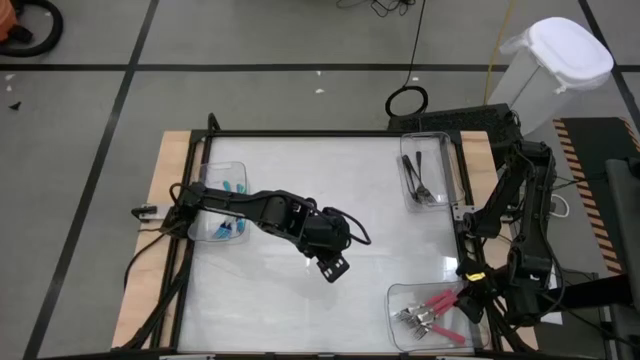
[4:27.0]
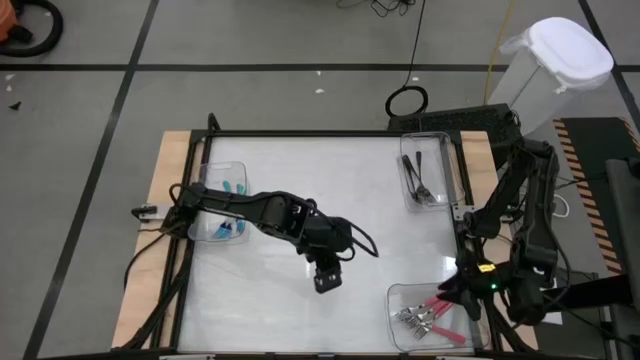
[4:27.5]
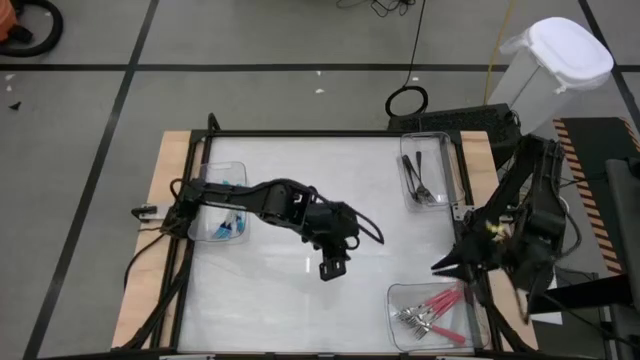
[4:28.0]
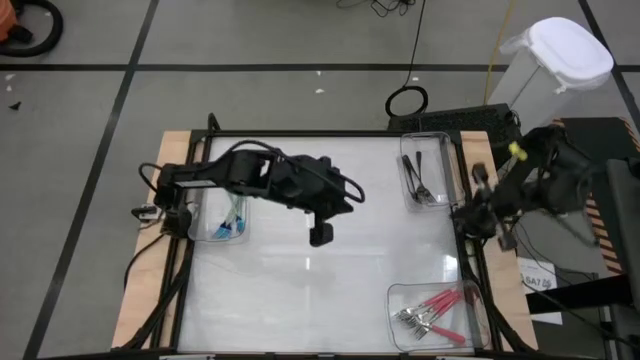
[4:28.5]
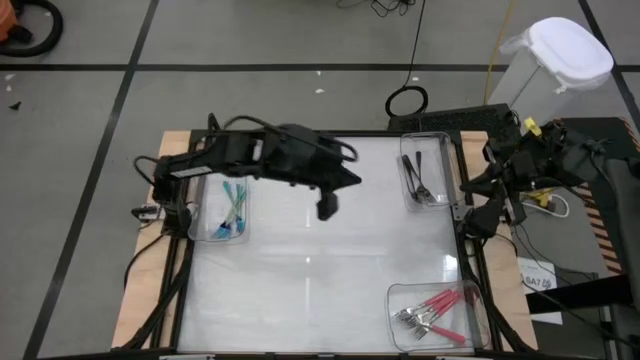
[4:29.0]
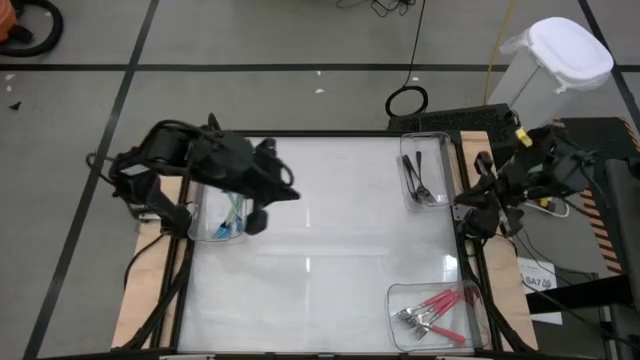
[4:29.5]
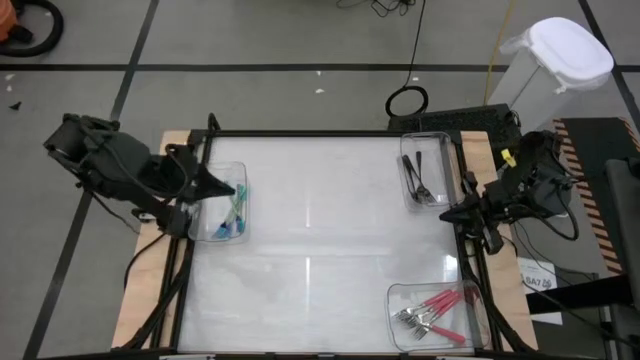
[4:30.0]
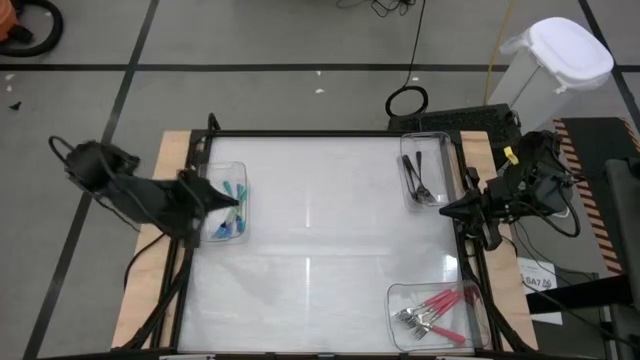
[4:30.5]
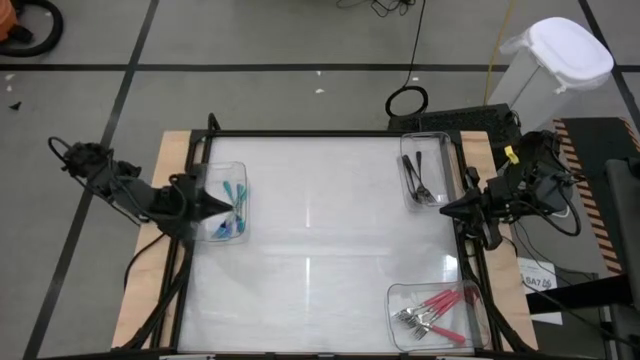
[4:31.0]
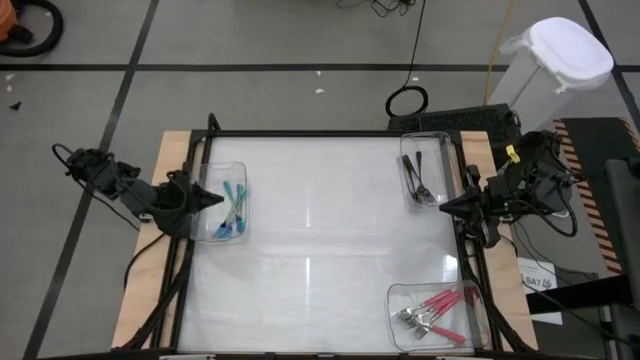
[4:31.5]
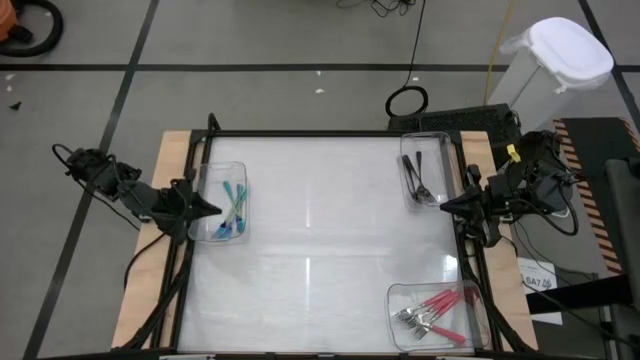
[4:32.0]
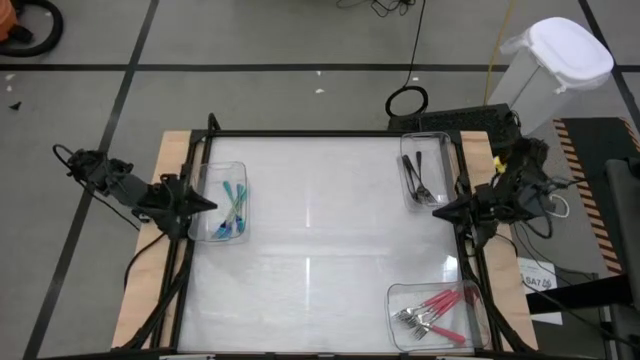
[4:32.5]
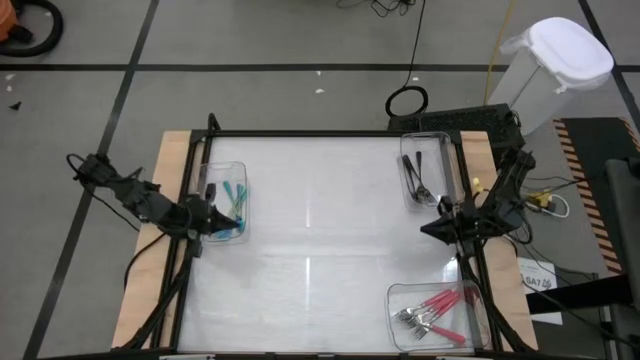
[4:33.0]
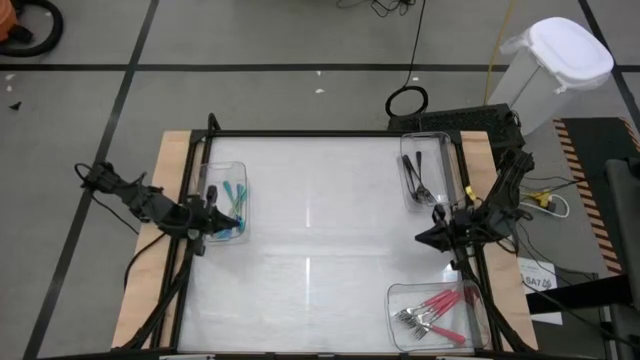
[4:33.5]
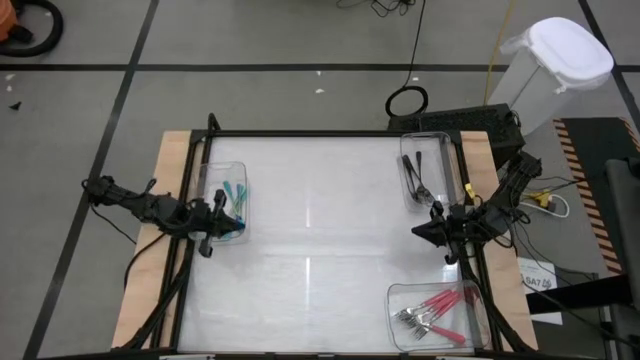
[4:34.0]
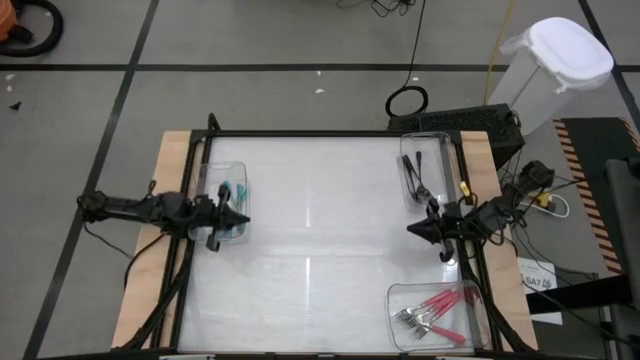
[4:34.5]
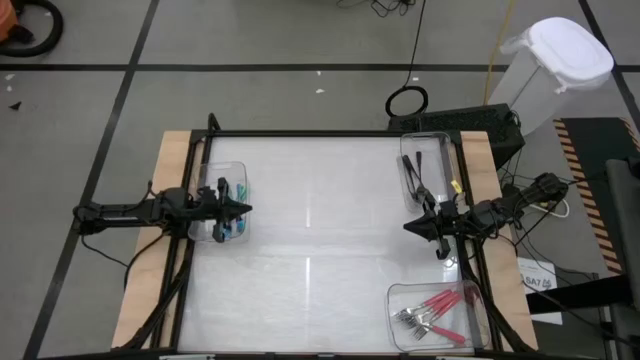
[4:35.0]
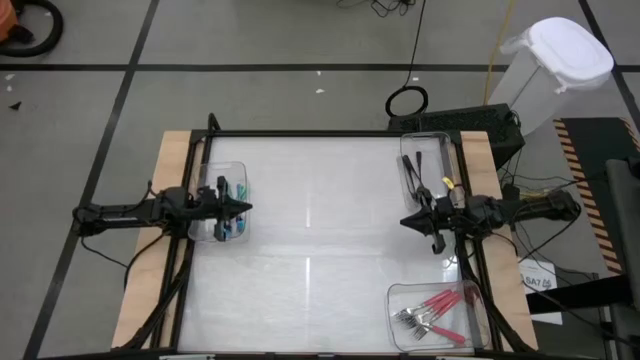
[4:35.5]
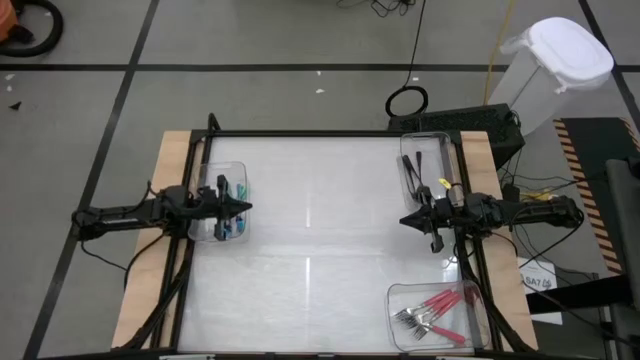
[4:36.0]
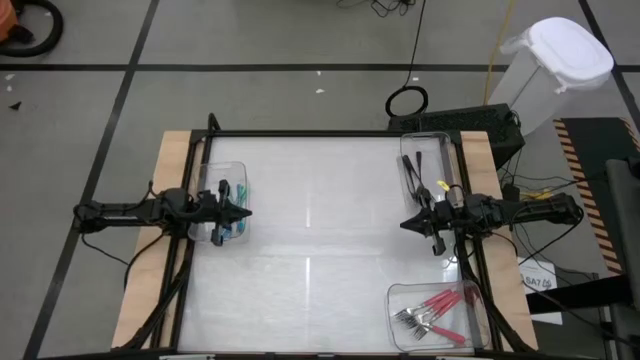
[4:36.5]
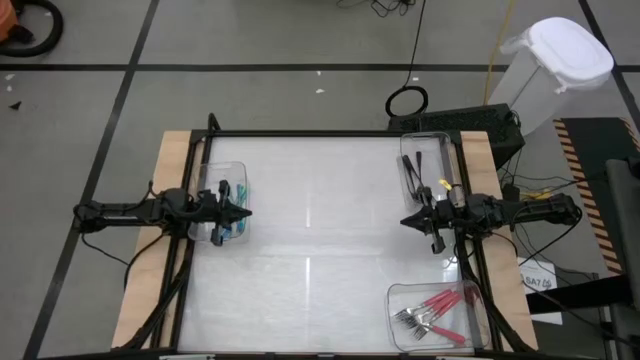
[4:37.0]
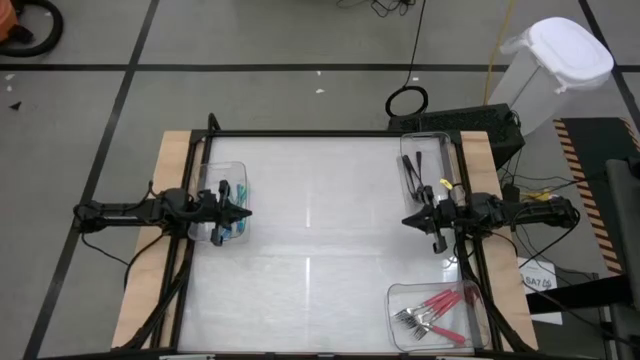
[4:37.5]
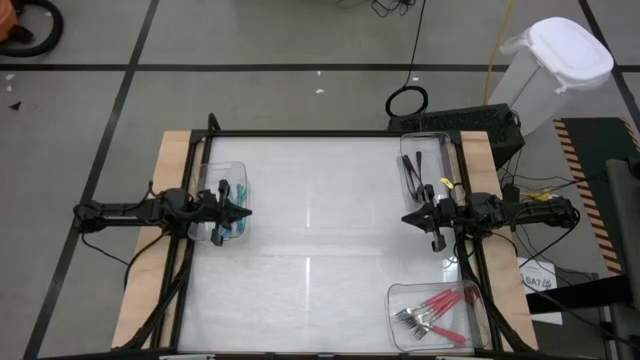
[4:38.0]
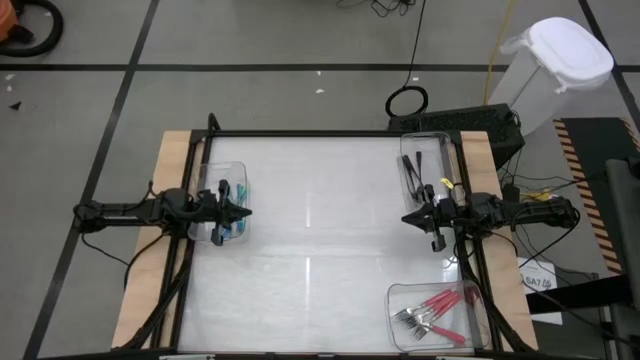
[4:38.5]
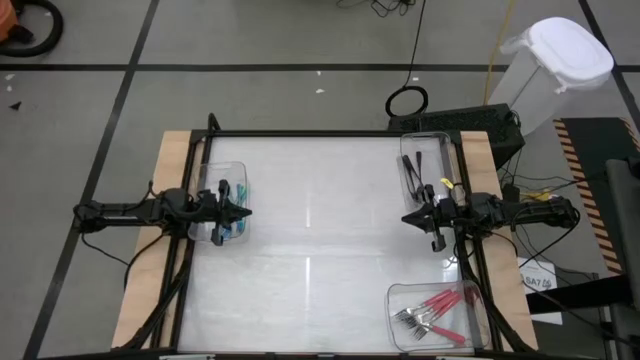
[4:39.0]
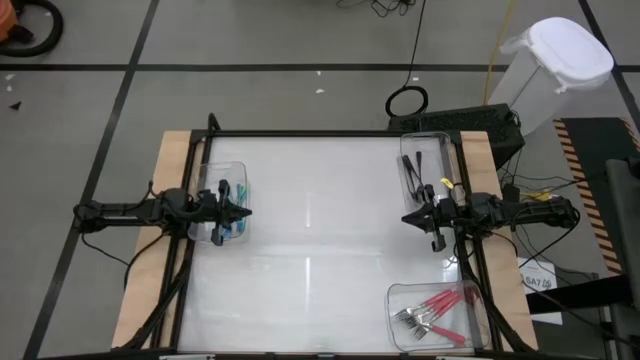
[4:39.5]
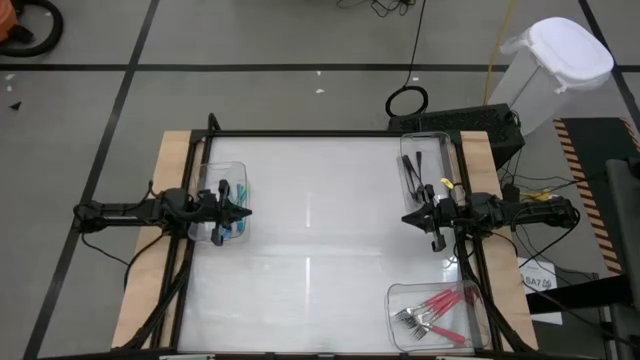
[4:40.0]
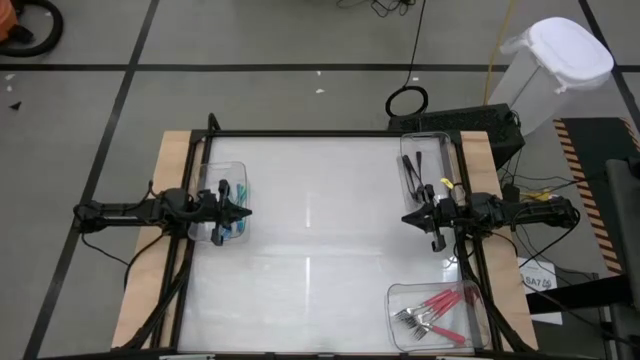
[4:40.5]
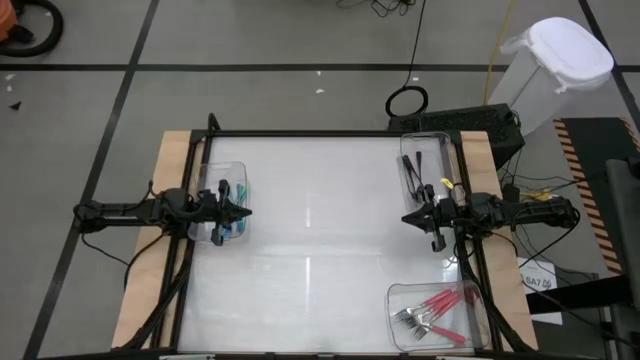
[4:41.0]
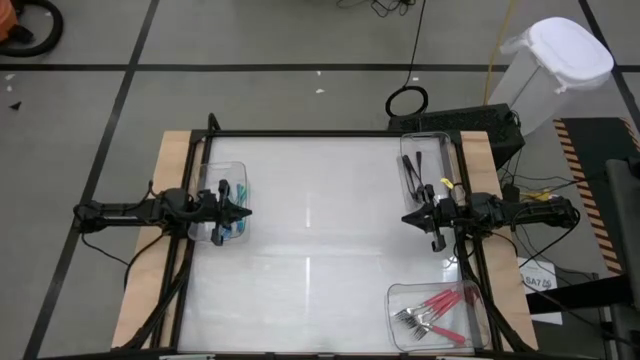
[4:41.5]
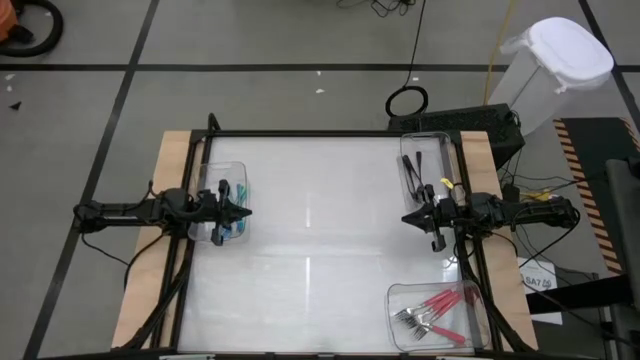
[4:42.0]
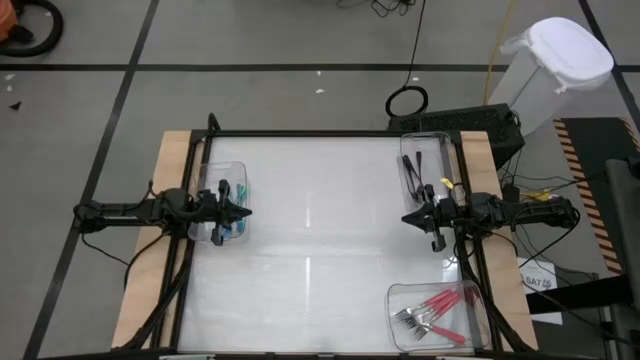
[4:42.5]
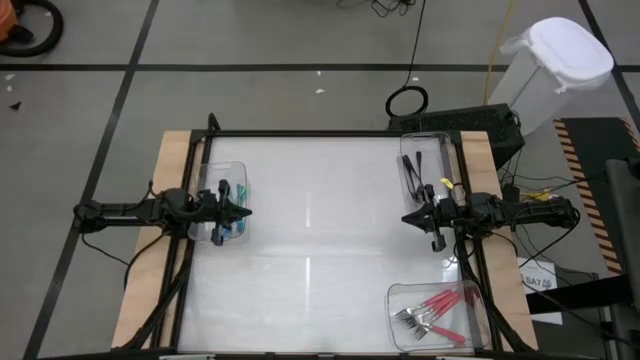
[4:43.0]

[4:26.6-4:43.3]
Task: Sort silverware by color (type)
Return to Home Position

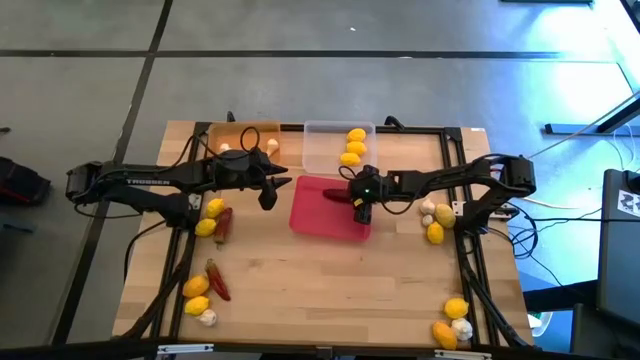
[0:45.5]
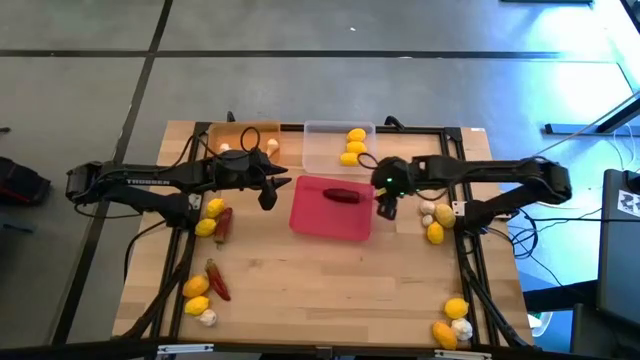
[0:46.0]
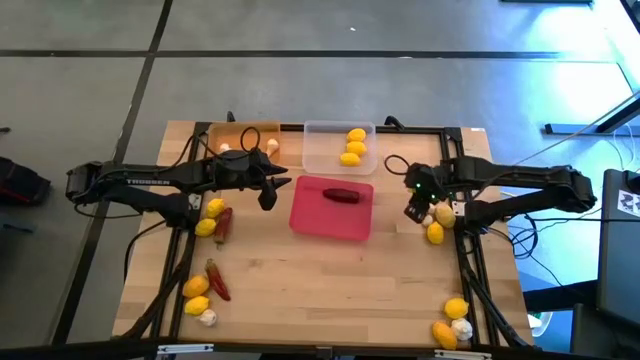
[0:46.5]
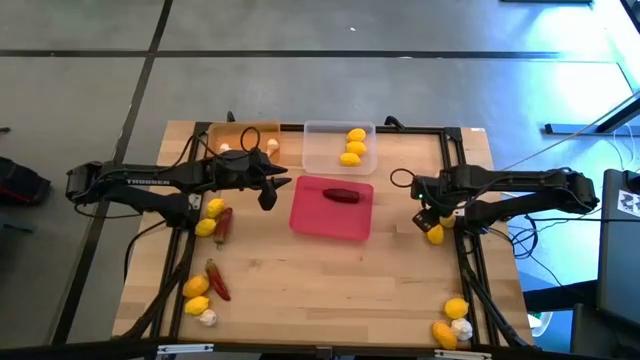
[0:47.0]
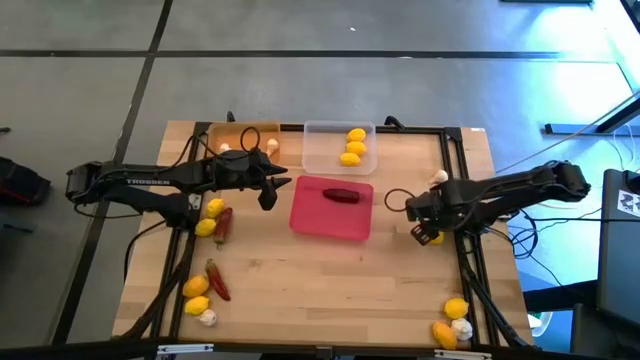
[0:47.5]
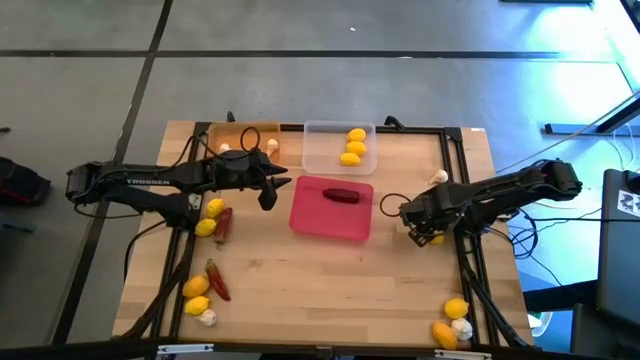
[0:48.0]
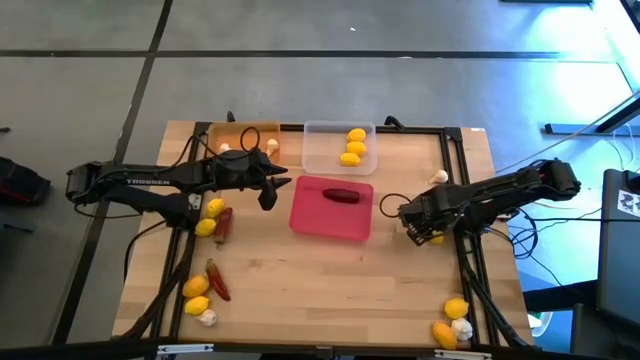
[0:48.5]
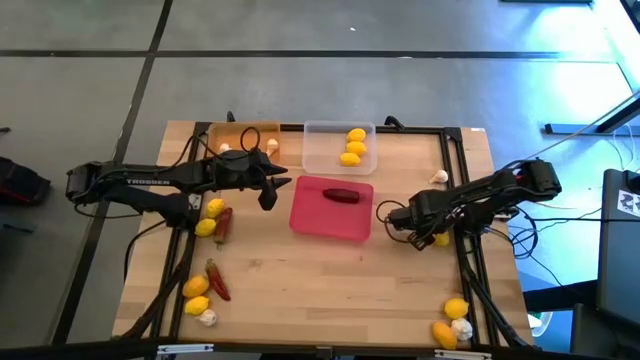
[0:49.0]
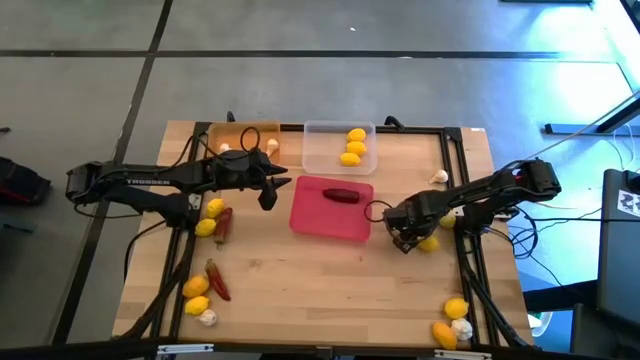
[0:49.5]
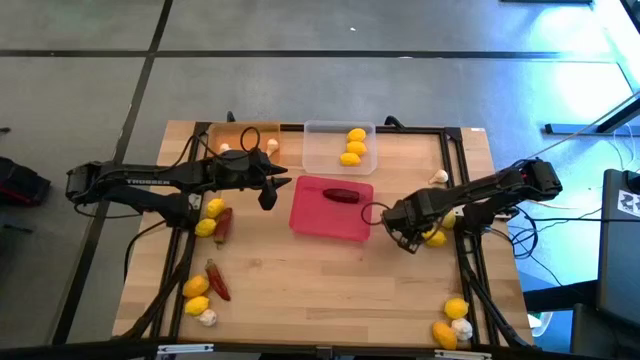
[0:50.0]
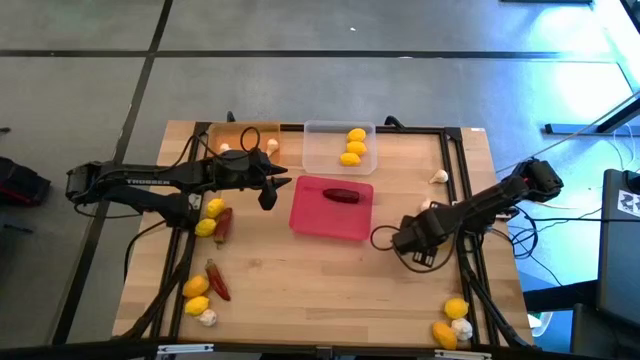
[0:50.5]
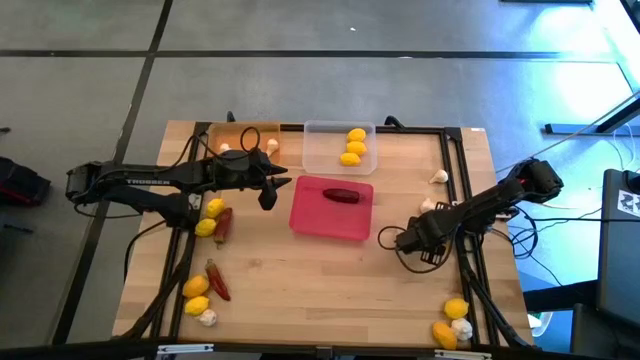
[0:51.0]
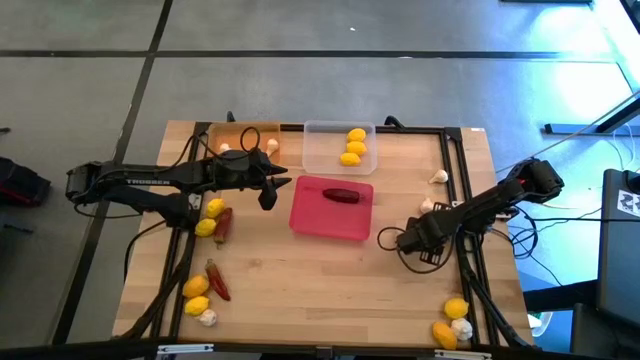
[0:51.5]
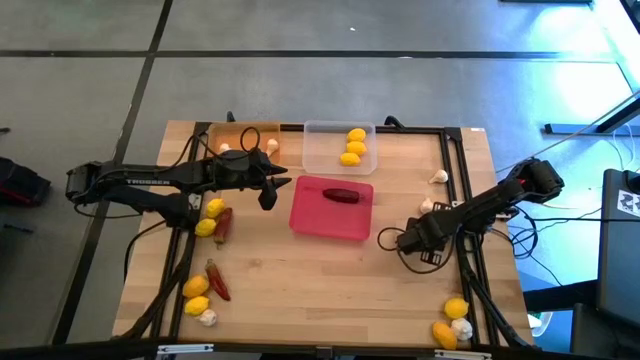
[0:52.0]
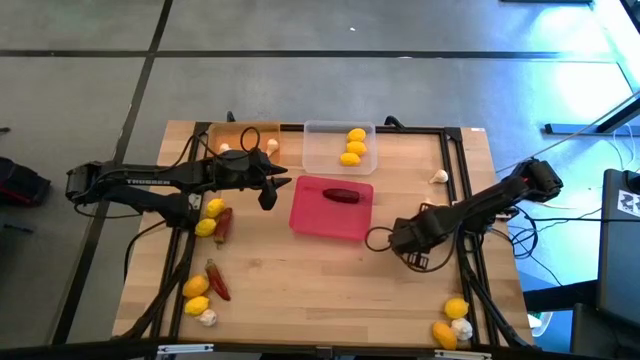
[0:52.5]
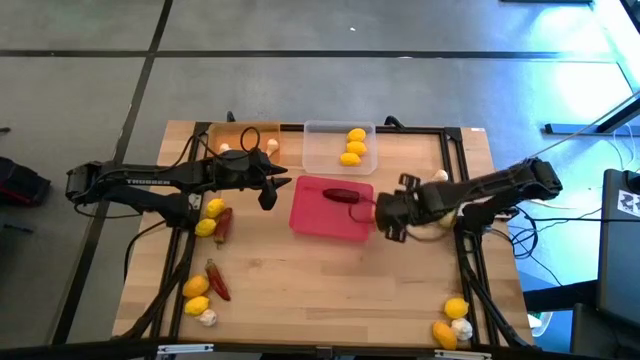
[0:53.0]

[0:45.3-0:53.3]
Task: Sort produce into baskets
Put the yellow lemon in the transparent bin
